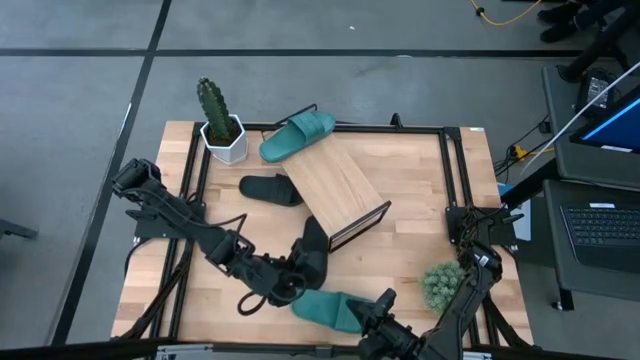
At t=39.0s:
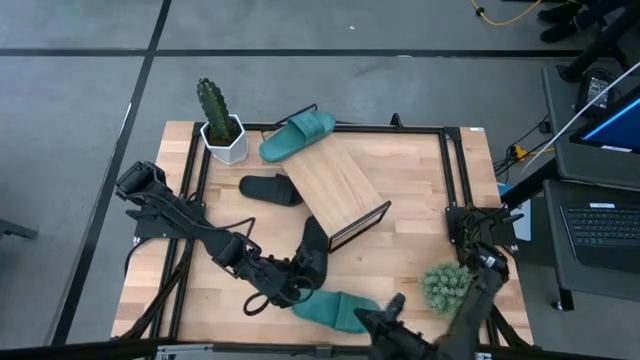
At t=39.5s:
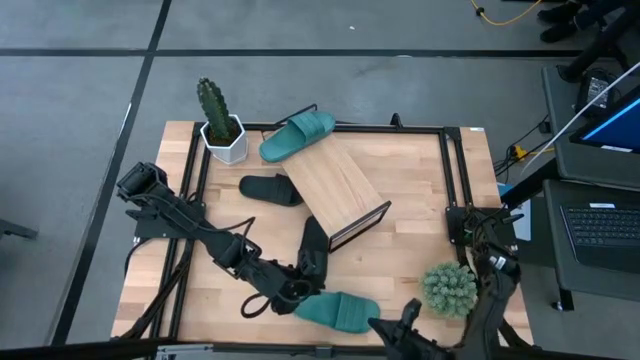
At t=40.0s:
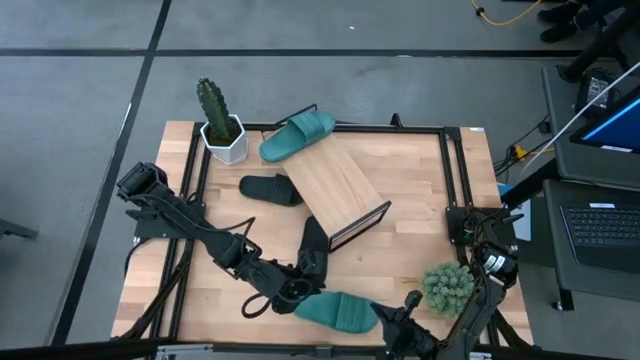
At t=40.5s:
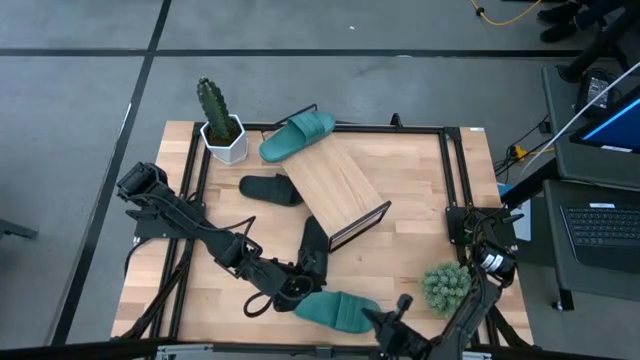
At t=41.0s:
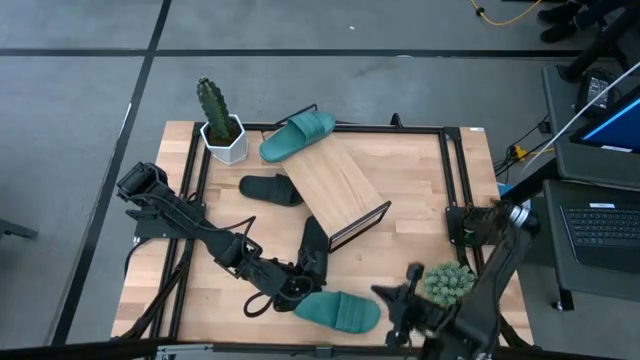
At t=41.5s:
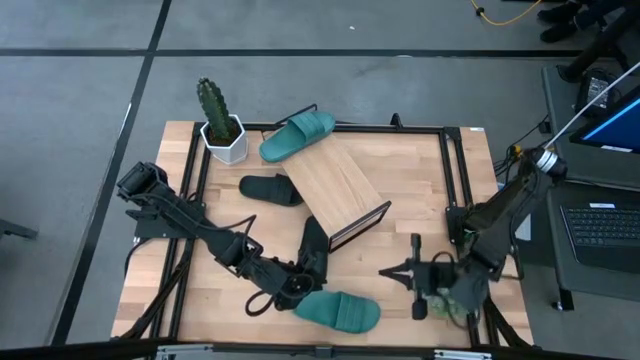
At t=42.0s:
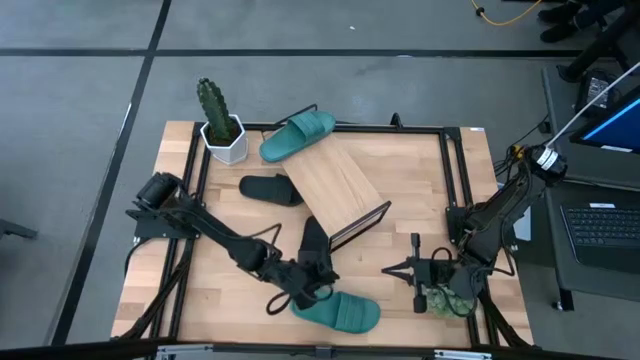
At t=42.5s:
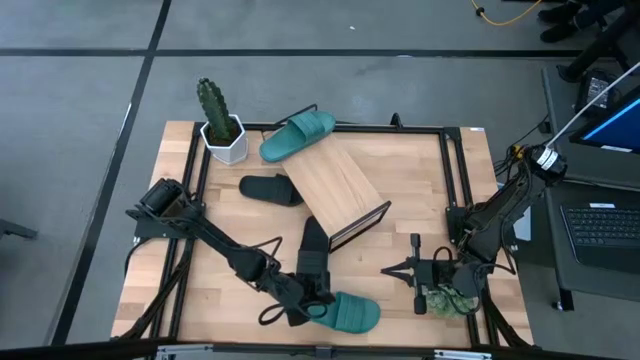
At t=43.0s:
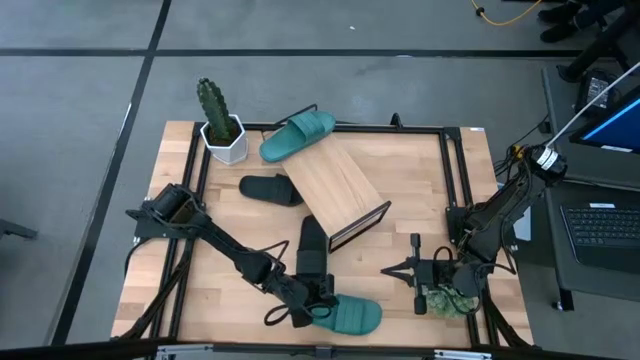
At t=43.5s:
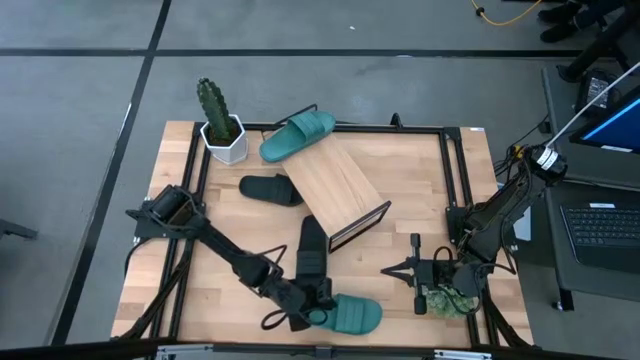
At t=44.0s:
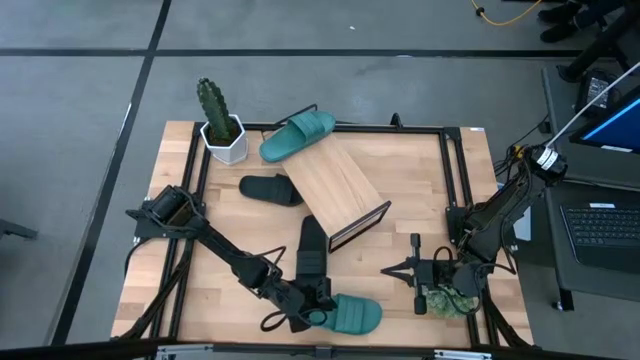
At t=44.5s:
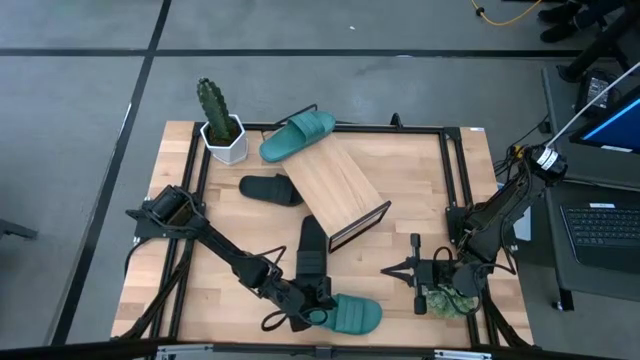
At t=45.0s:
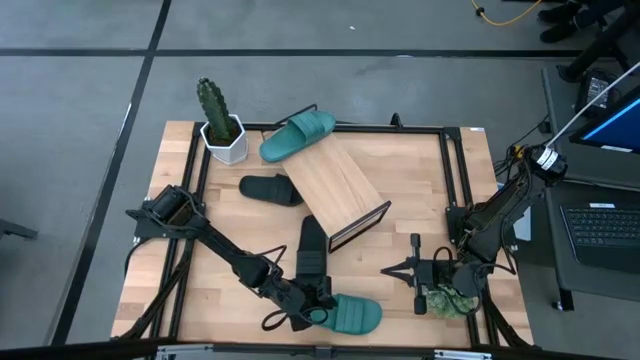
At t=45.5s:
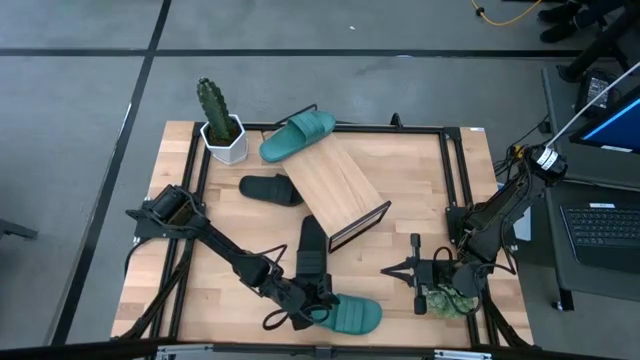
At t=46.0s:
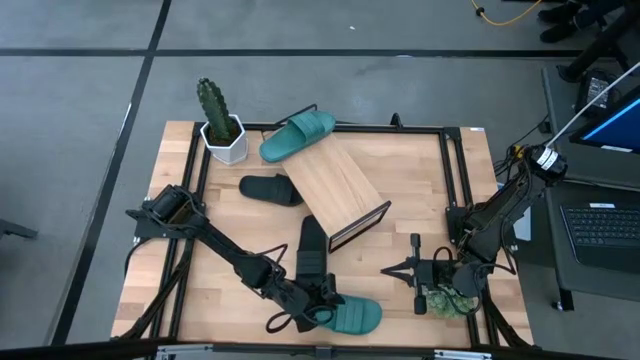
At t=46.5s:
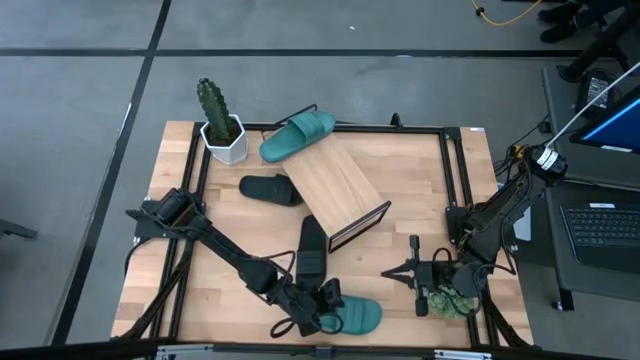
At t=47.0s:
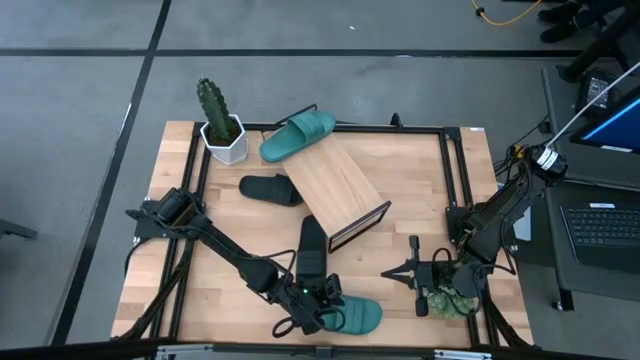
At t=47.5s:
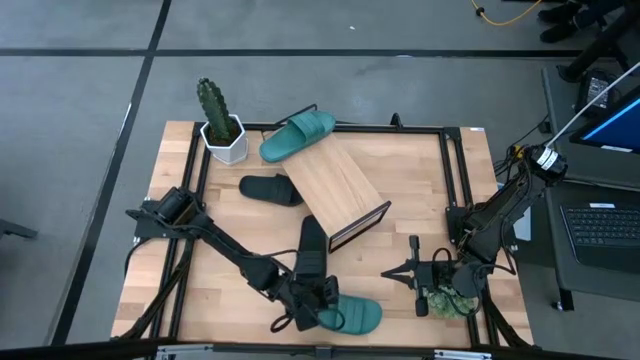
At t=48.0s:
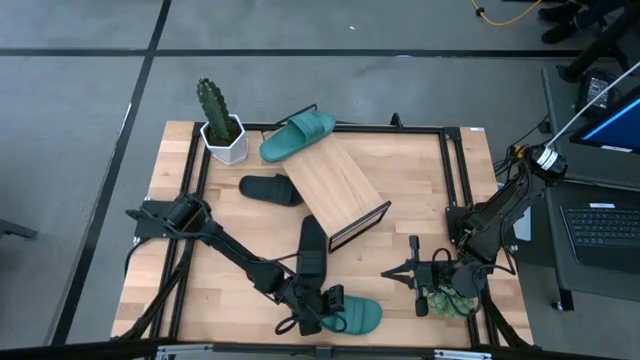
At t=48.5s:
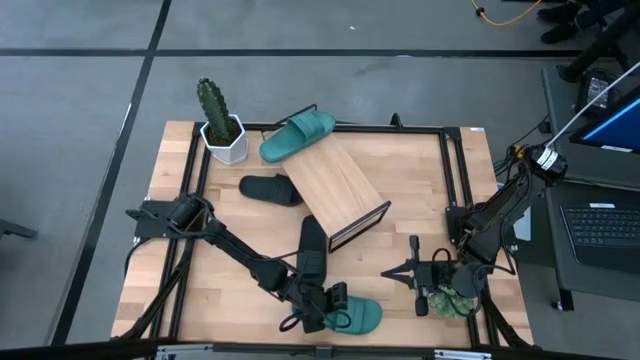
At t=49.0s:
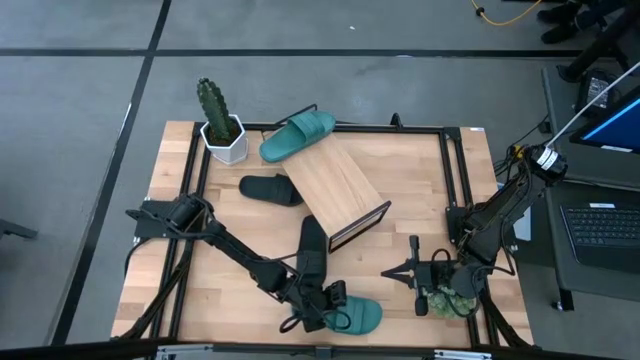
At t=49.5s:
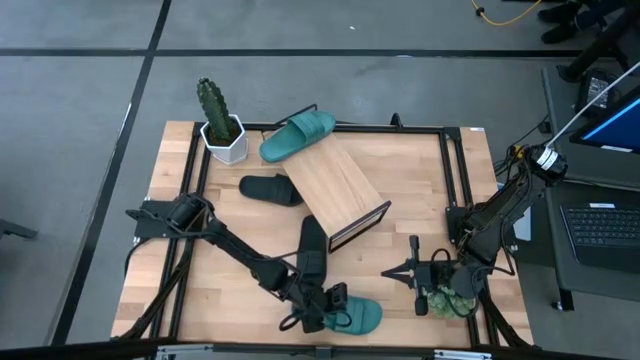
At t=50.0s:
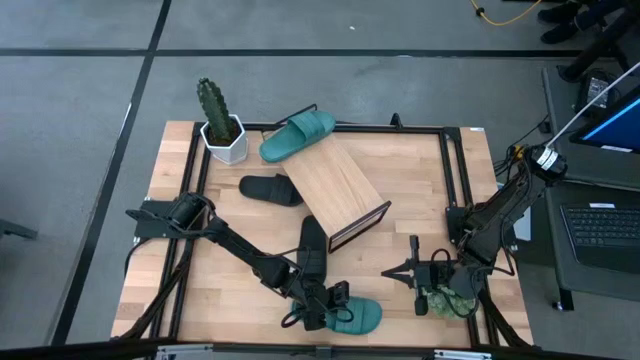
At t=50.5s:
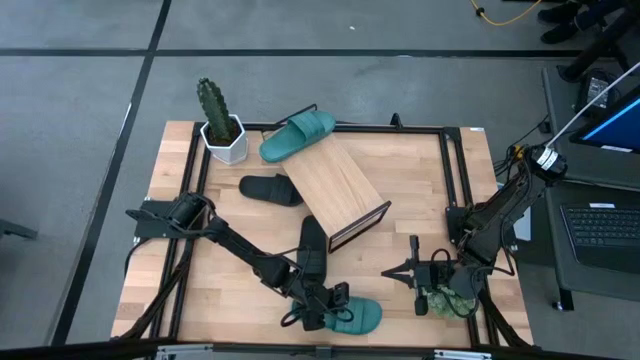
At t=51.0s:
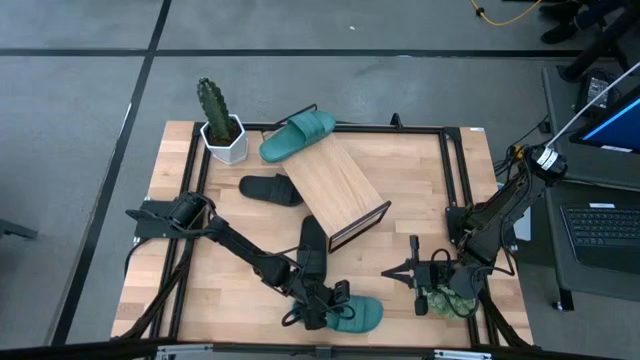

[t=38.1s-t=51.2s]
Task: Pick and place slides into the shelf
Put the green slipper onto the shelf

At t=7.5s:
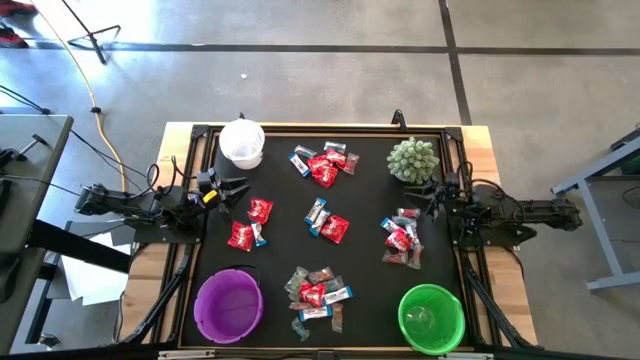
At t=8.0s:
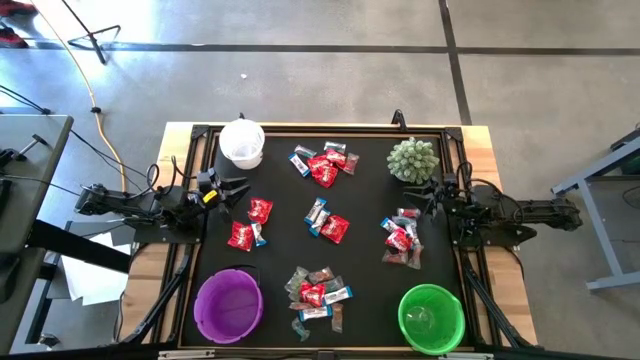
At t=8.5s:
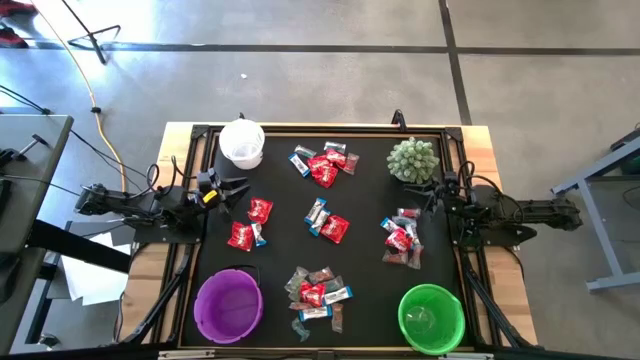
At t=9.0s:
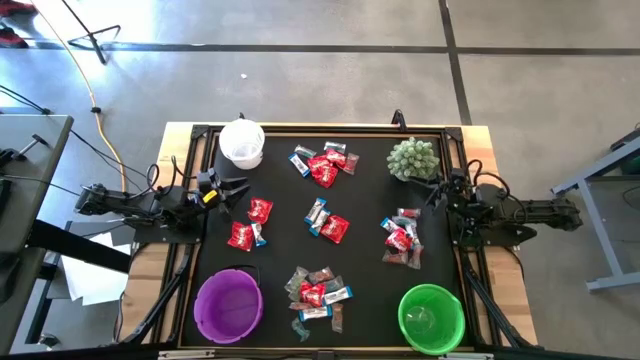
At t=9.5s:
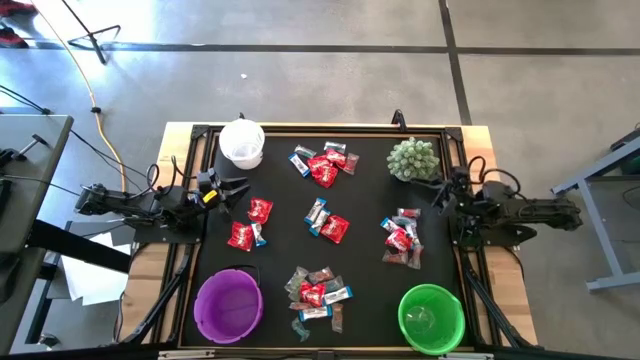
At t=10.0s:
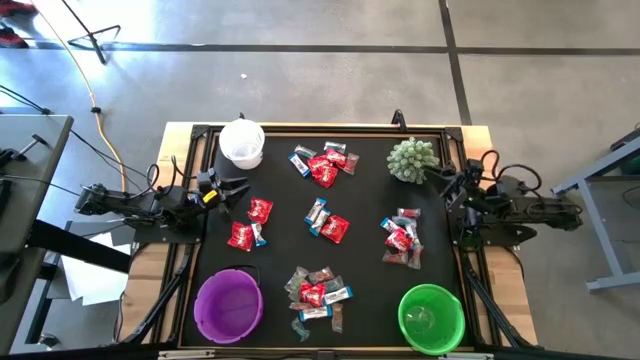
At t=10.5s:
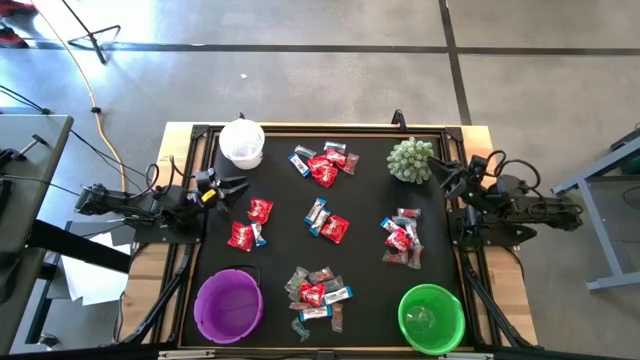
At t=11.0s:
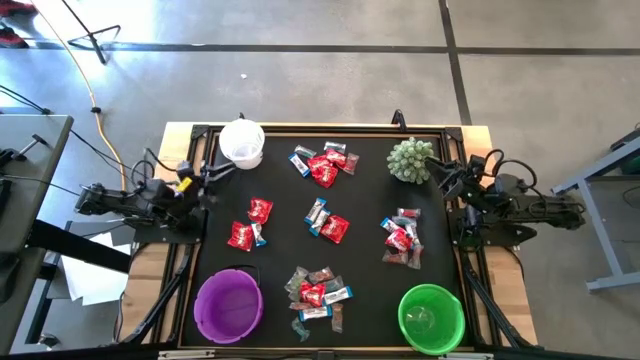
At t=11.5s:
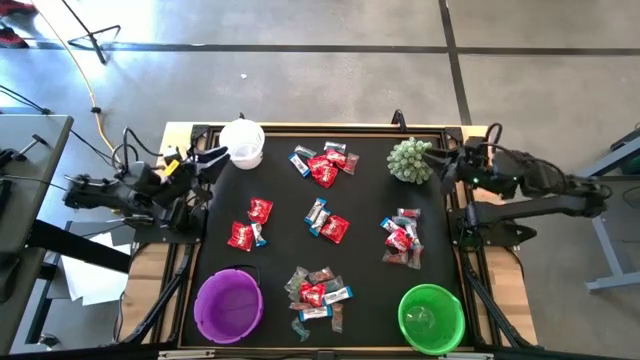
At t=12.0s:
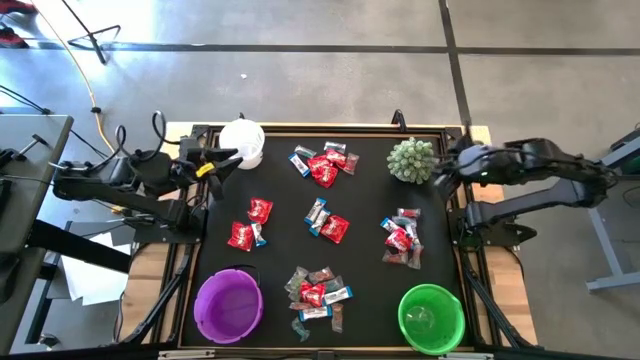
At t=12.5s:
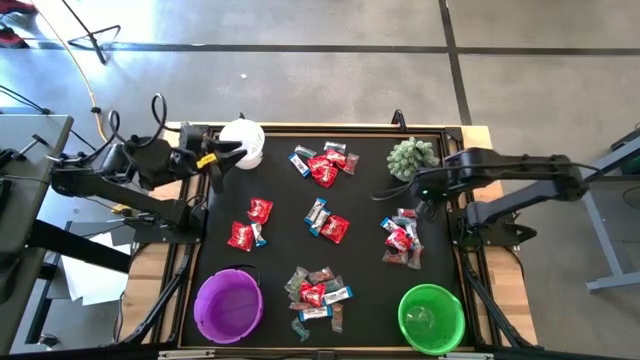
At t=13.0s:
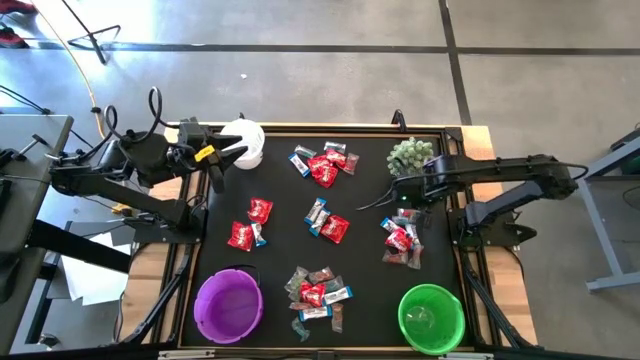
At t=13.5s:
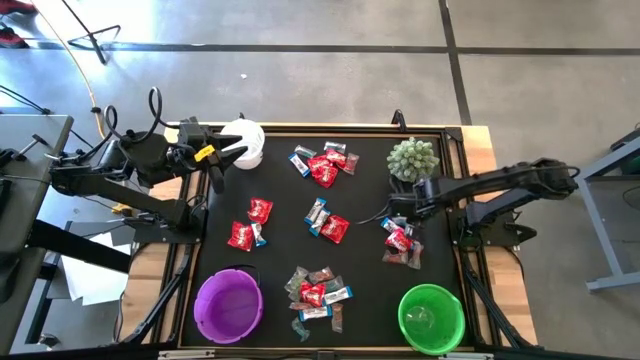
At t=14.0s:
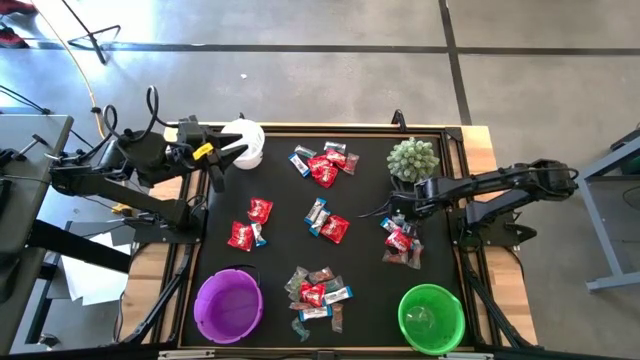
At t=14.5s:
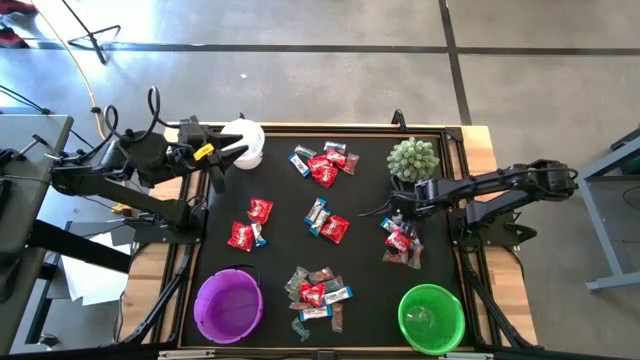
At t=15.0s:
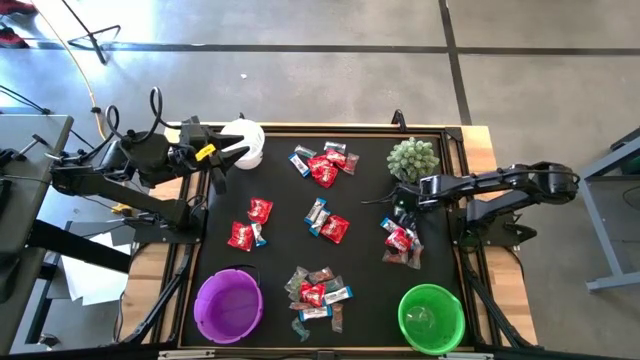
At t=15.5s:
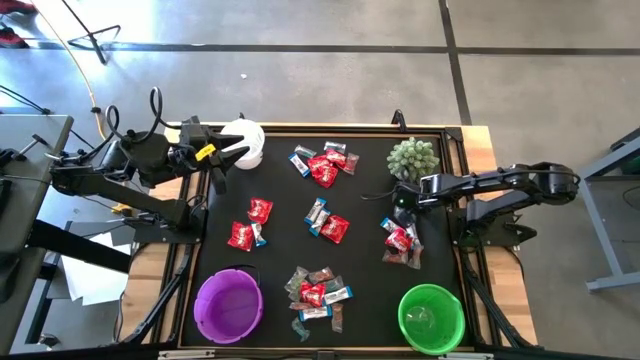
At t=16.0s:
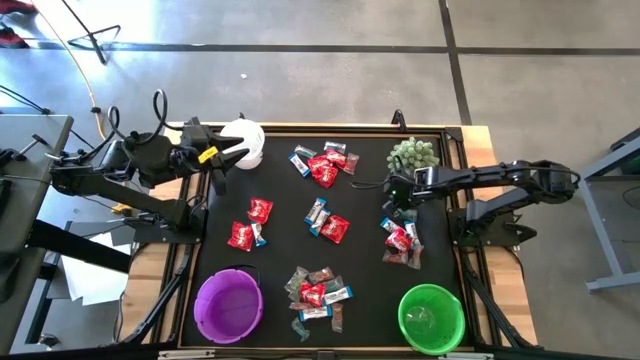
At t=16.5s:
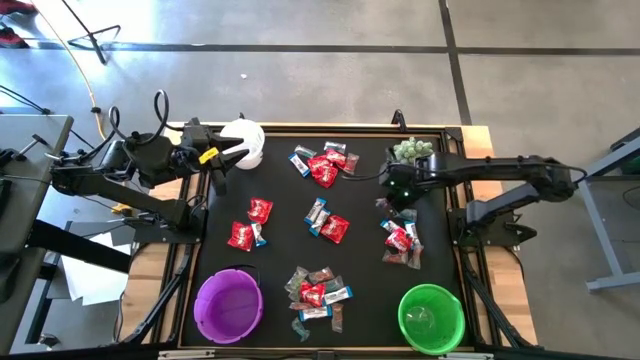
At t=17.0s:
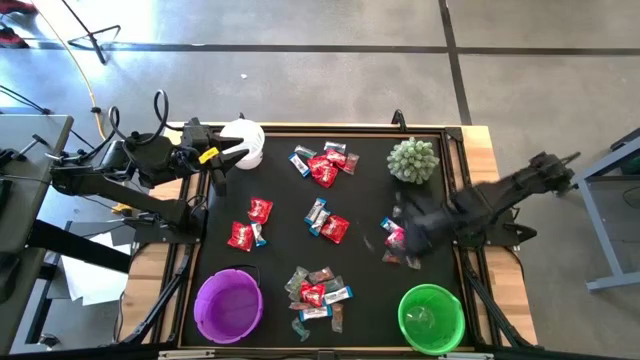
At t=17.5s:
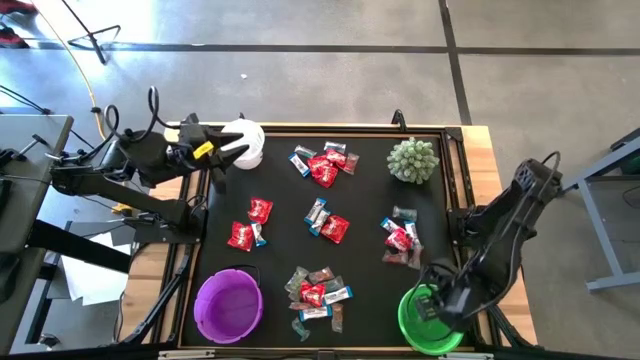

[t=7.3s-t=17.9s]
Task: Sort candy
Put the red gummy into the green bucket
